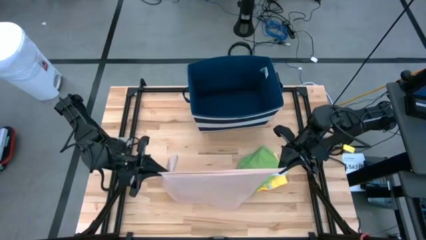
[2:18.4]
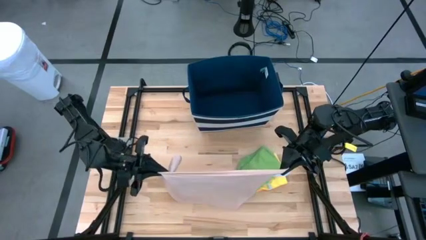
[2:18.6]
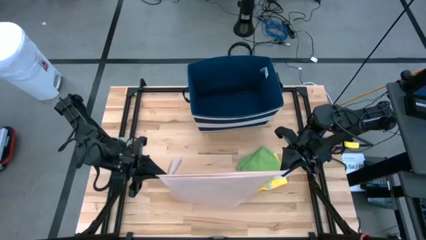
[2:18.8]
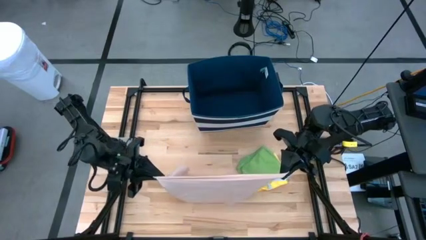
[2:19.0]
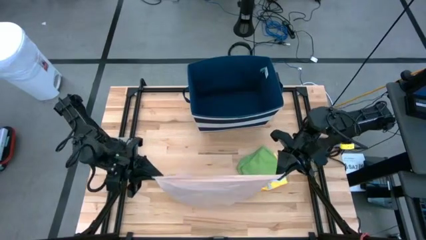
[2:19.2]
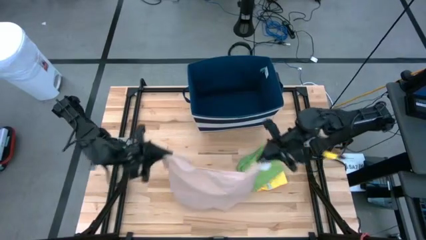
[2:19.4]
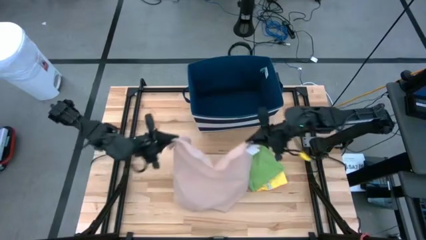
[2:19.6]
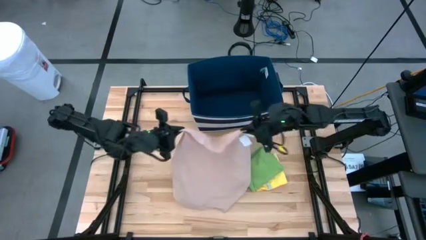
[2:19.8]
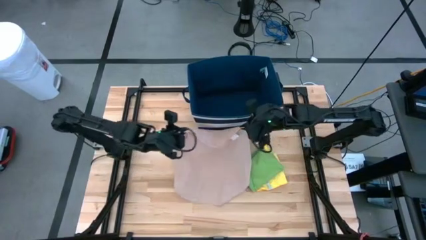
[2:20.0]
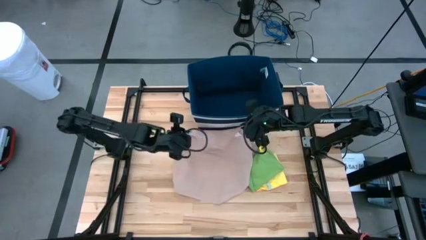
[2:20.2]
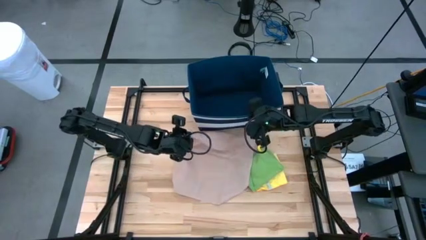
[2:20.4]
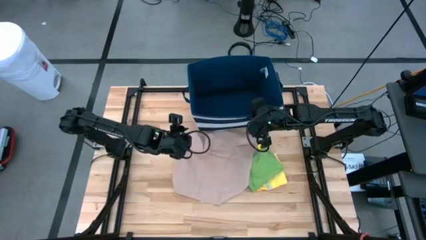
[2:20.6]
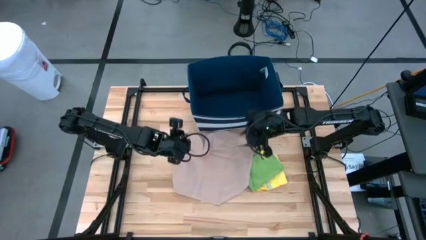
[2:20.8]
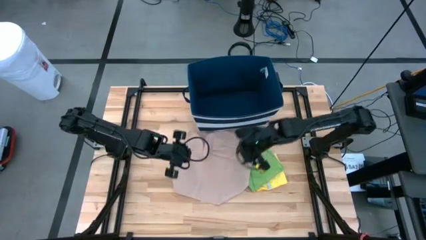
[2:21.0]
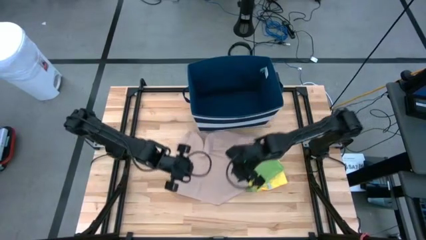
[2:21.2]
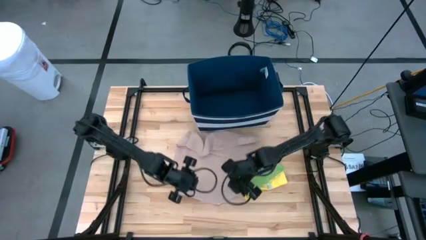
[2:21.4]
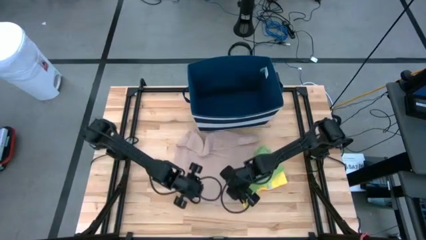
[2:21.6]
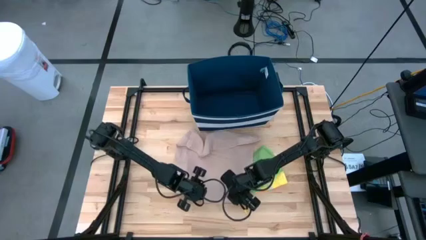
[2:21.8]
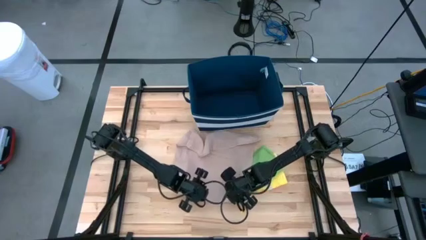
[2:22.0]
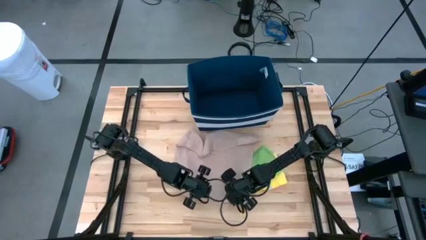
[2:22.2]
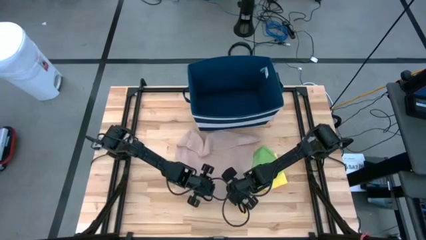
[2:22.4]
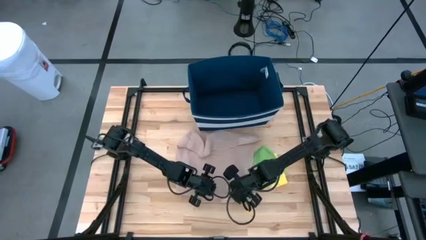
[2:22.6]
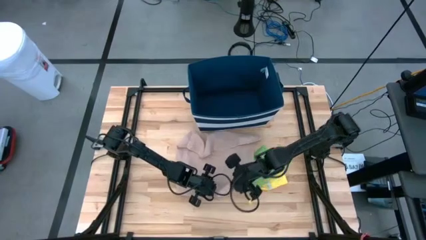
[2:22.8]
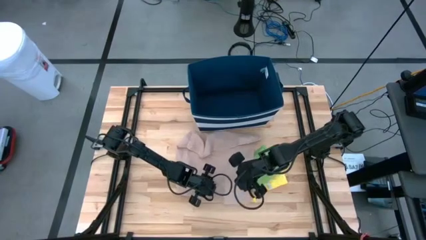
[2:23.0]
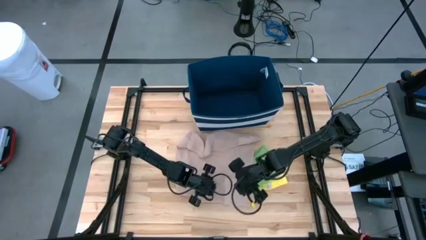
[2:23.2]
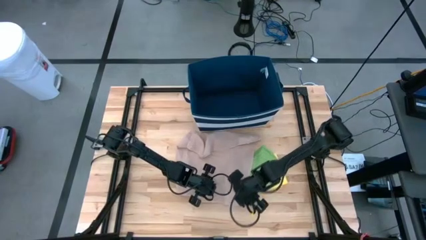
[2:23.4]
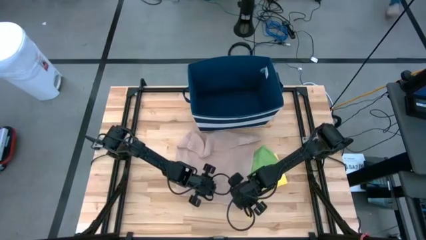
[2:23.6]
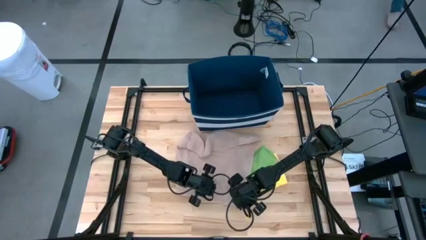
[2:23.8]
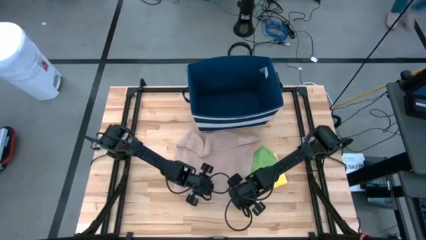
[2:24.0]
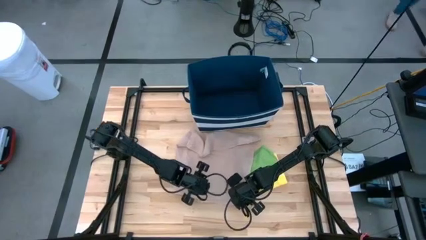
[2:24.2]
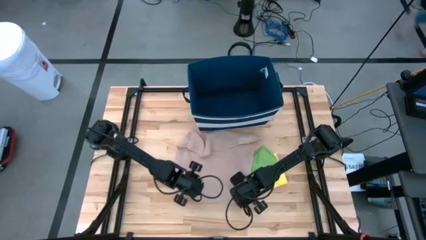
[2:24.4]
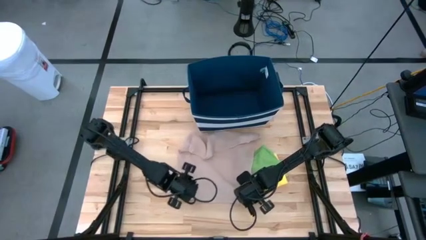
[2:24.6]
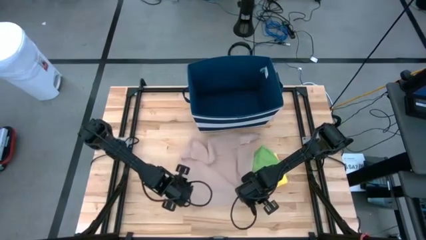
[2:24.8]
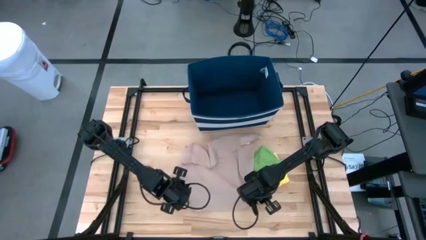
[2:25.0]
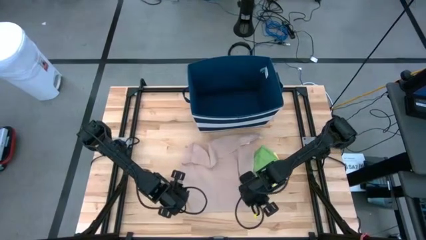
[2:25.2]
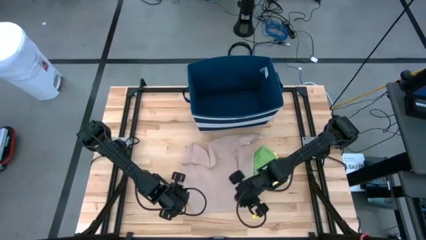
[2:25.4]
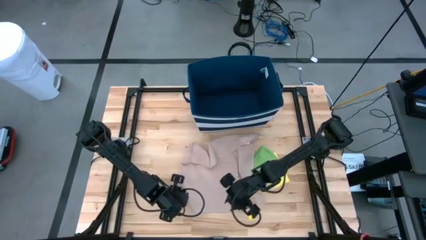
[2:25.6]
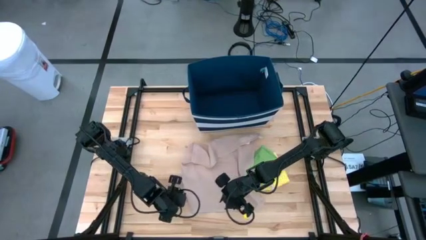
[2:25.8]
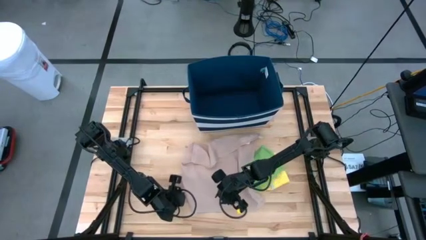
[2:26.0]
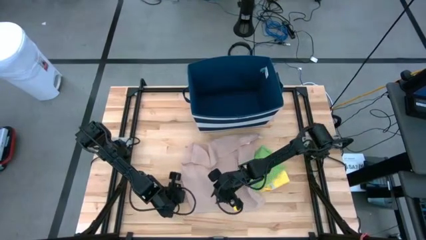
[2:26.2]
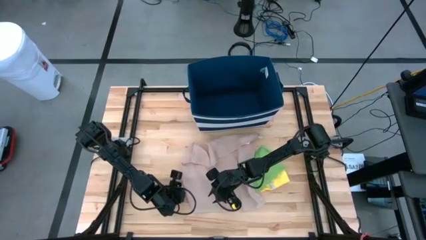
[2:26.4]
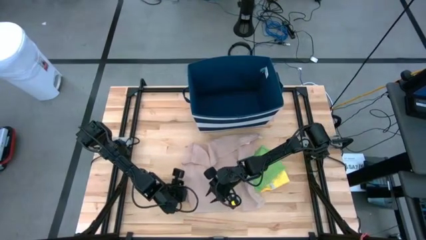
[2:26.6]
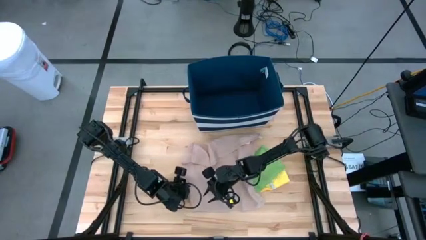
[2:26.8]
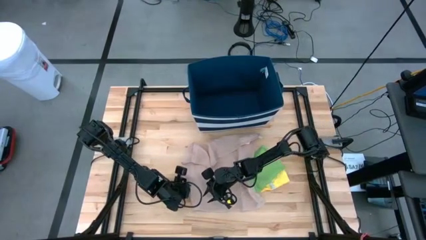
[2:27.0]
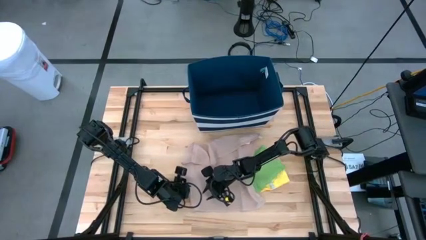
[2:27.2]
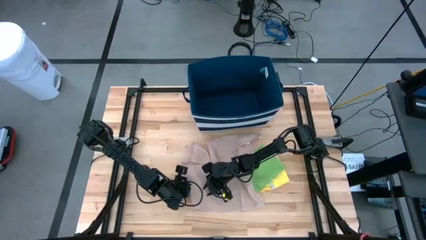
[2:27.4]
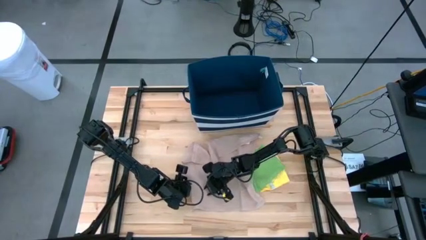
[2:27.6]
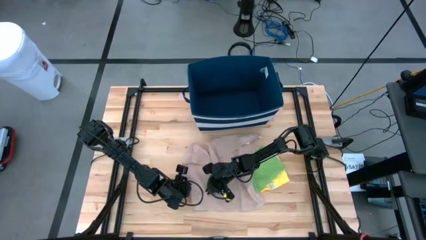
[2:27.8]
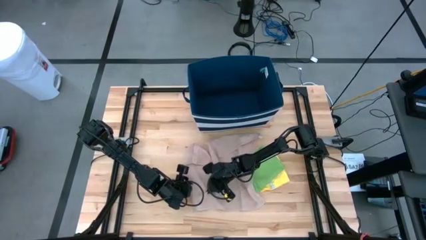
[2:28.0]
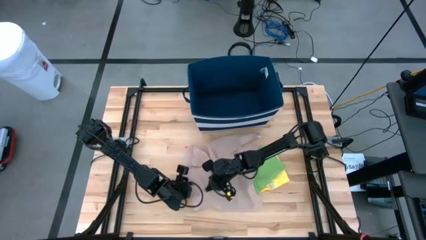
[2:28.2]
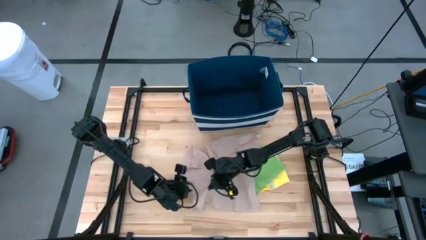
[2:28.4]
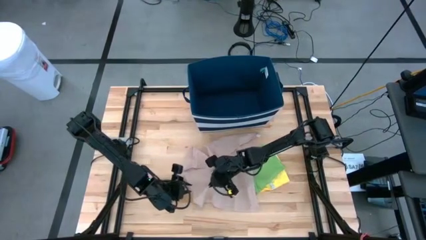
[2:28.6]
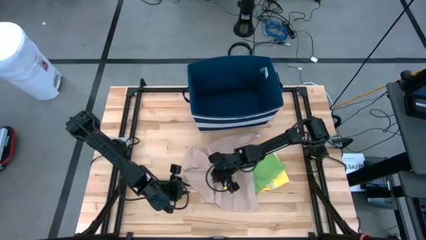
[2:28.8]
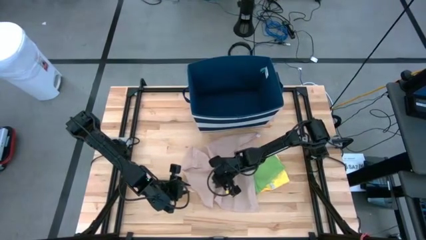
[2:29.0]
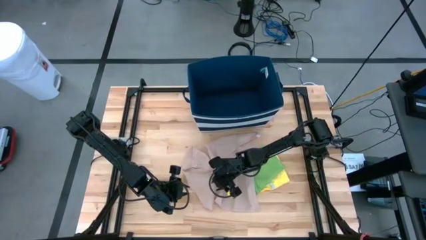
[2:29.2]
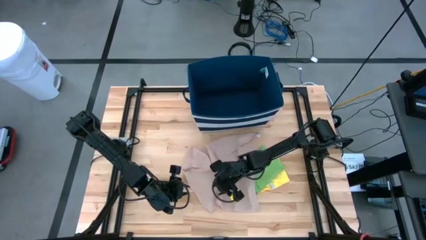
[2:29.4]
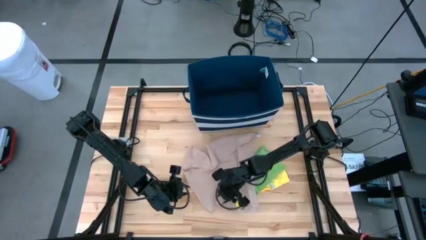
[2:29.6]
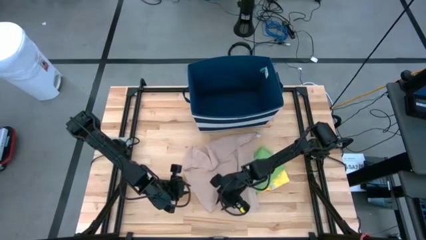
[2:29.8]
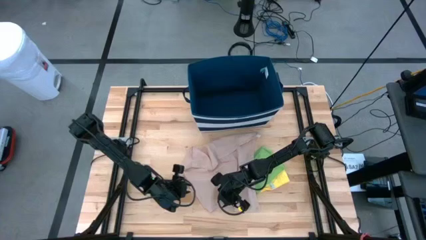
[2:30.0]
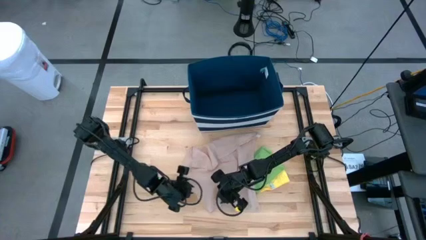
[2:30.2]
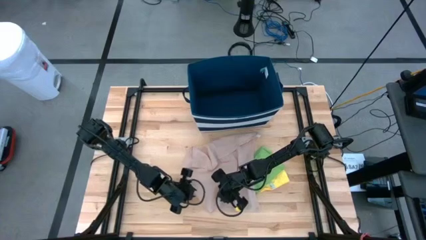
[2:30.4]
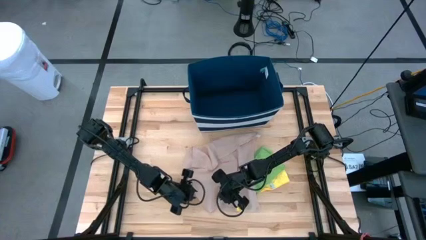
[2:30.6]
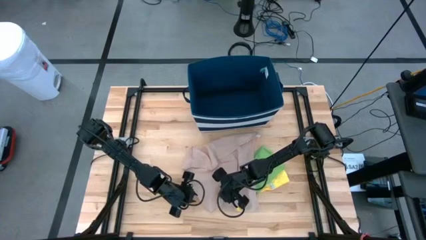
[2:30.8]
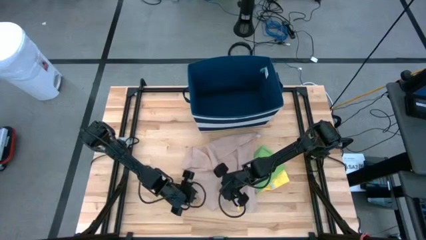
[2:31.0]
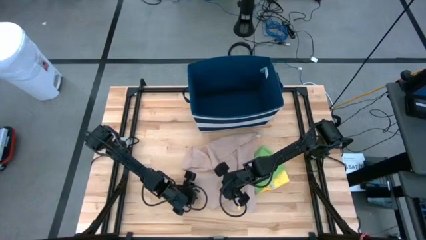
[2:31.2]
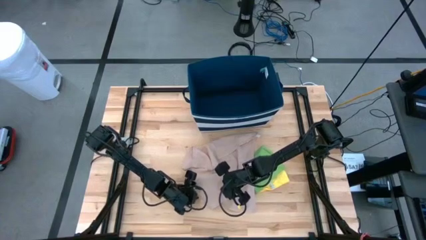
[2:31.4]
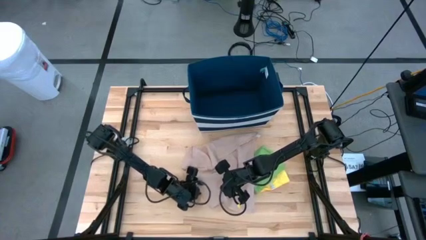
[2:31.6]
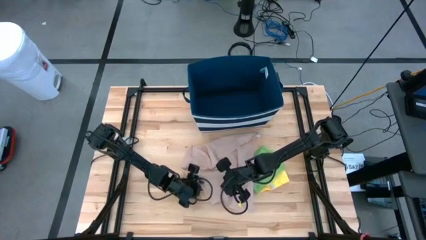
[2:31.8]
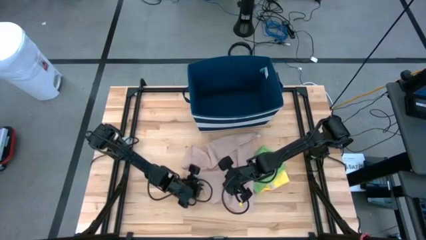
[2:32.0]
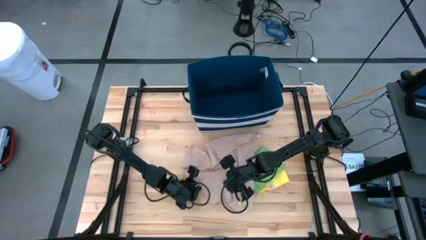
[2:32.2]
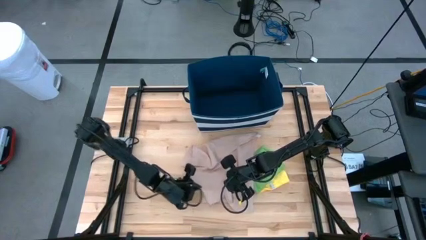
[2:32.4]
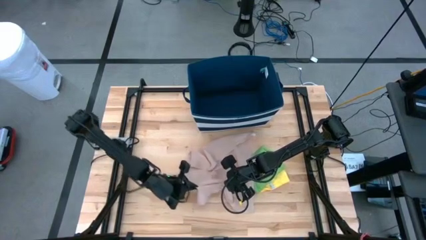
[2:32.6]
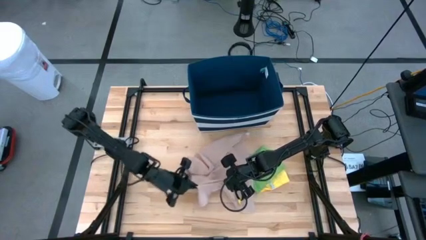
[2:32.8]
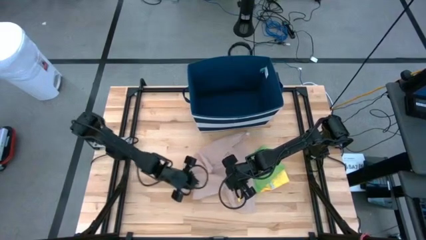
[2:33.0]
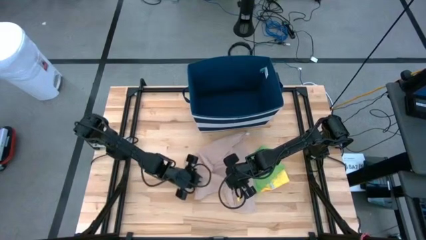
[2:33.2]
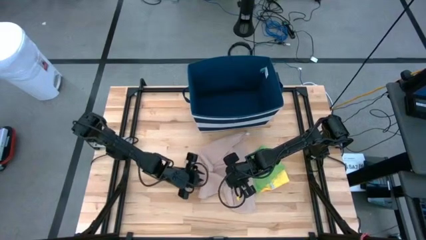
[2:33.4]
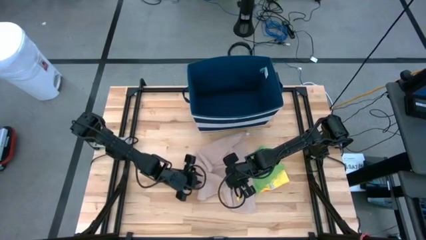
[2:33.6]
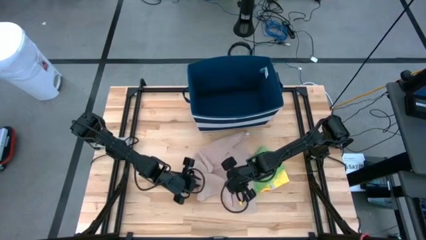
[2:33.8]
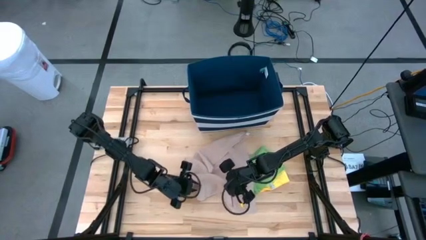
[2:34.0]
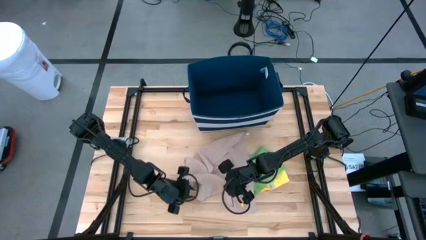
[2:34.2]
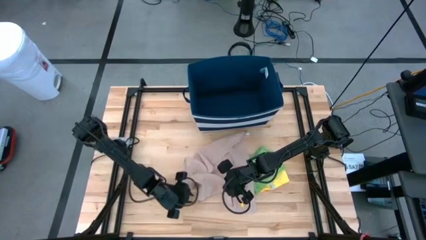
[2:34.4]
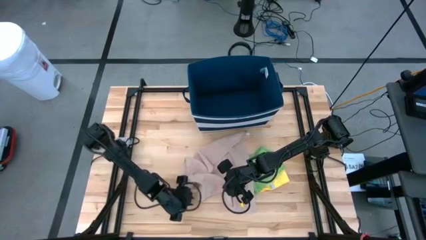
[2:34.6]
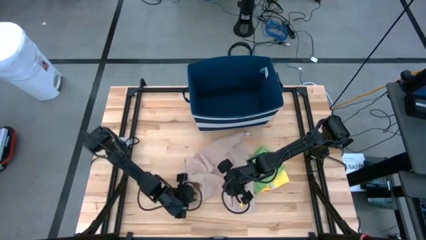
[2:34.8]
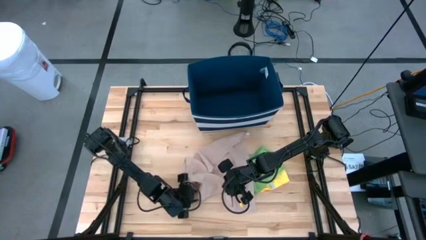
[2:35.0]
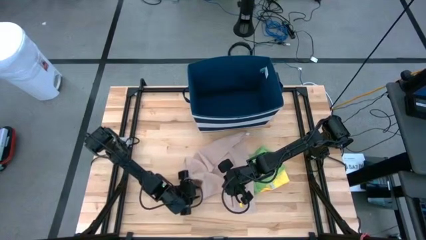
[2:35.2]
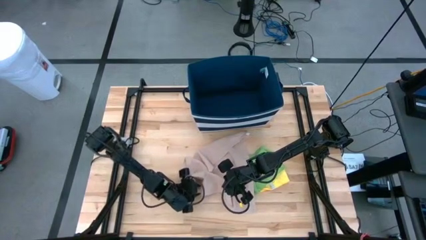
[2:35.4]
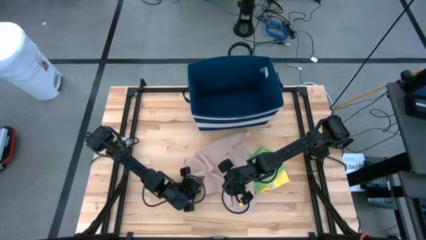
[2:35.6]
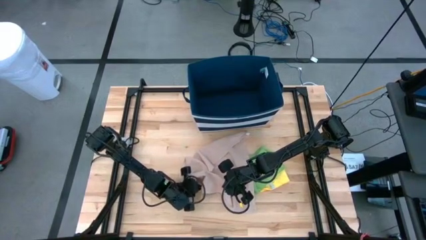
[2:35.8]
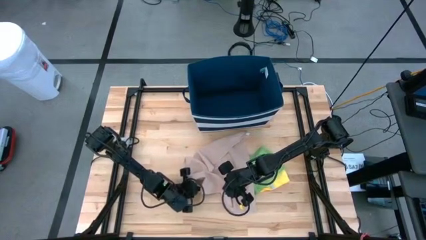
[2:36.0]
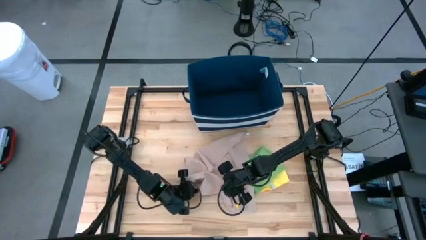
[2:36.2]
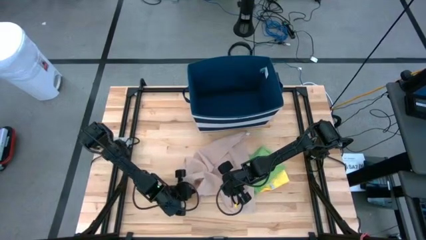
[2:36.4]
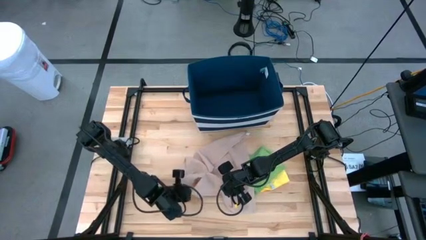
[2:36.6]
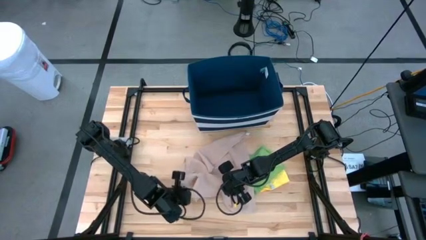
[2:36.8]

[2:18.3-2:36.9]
Task: Fold towel
Fold the light brown towel
